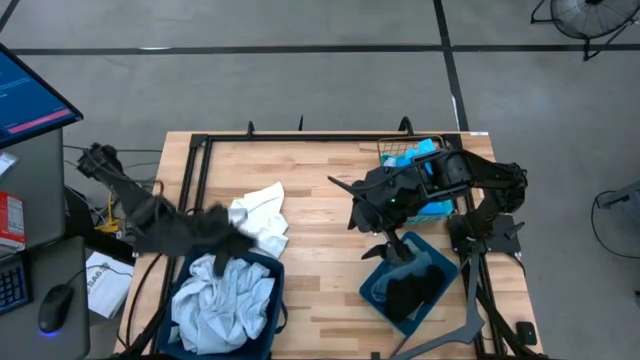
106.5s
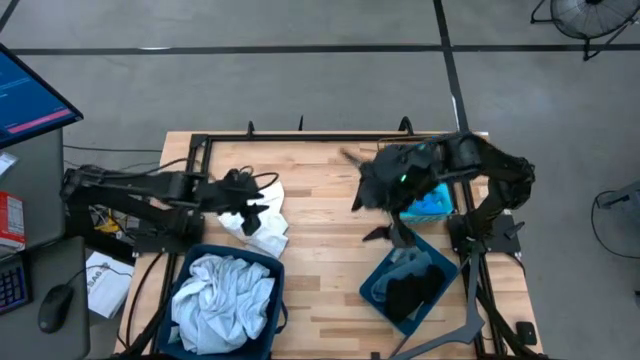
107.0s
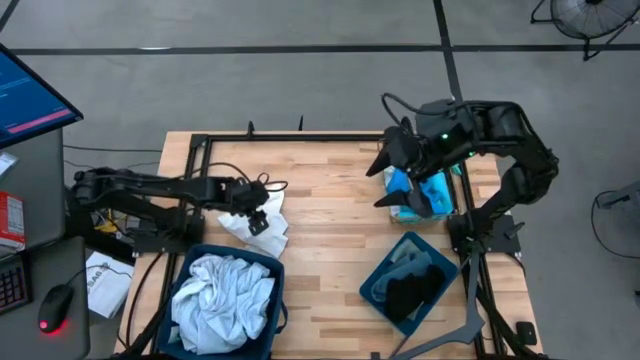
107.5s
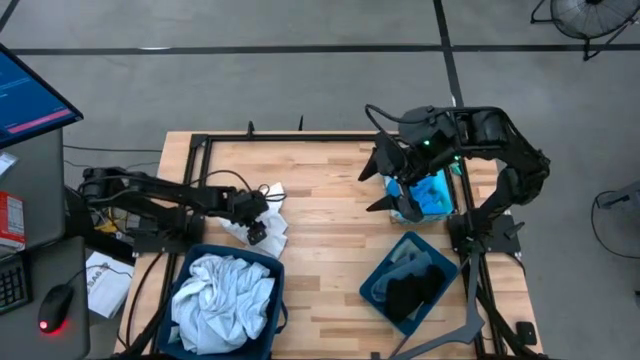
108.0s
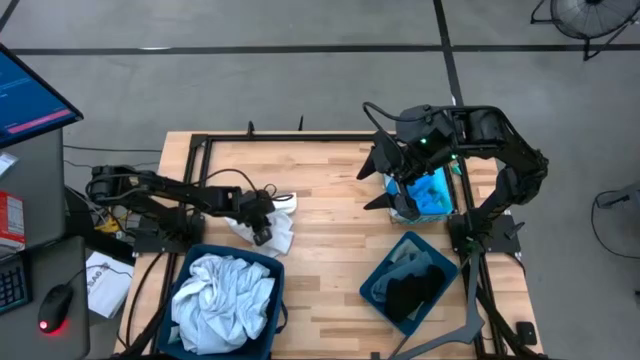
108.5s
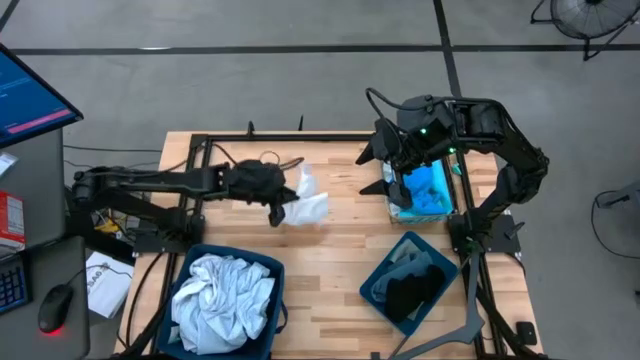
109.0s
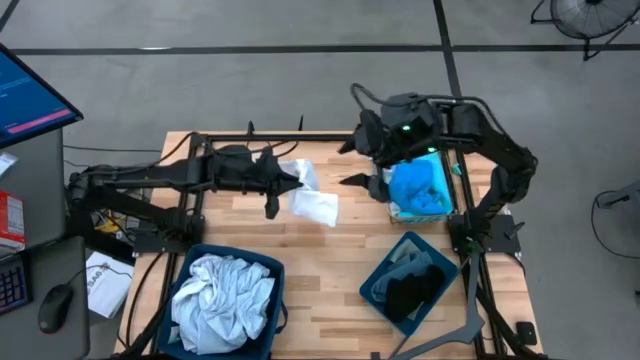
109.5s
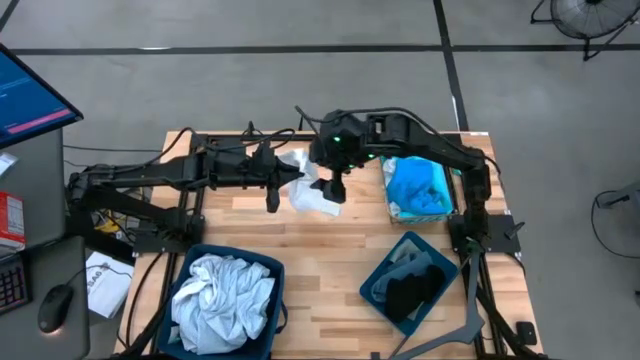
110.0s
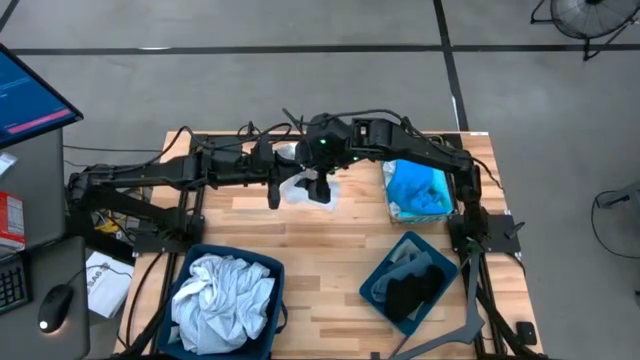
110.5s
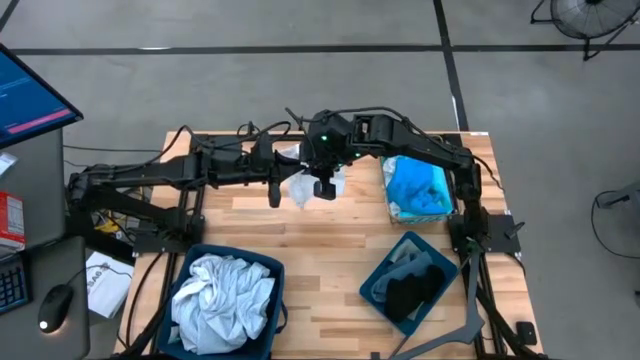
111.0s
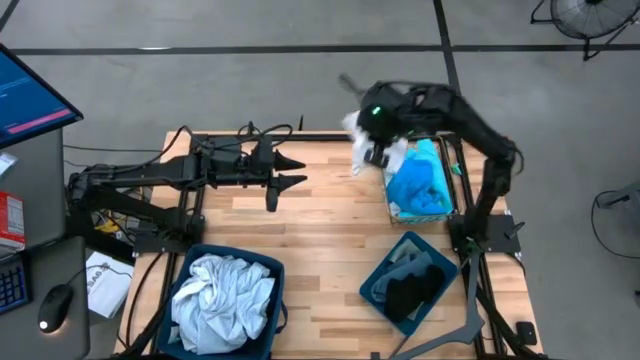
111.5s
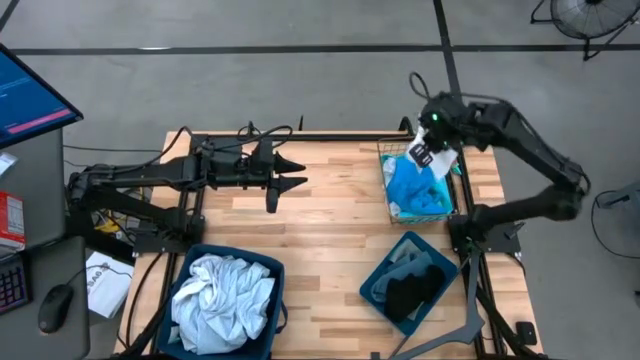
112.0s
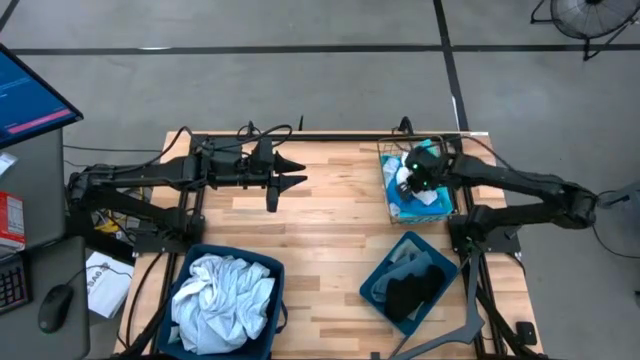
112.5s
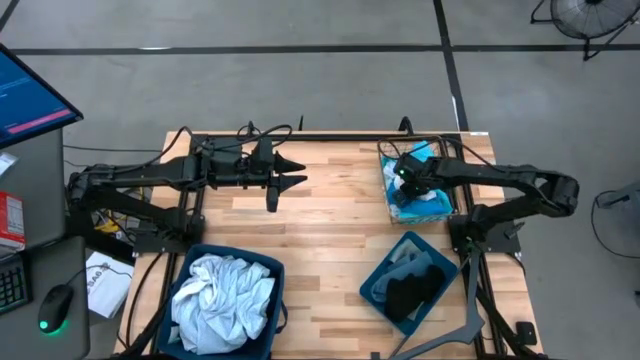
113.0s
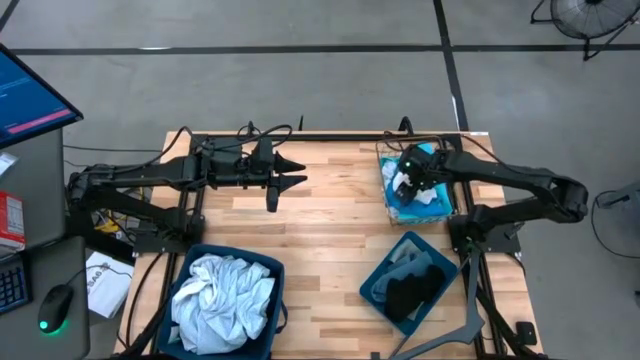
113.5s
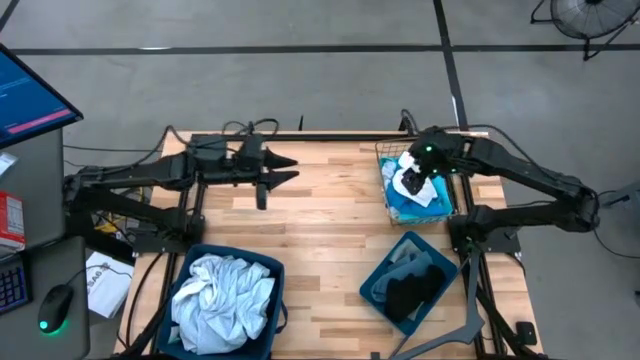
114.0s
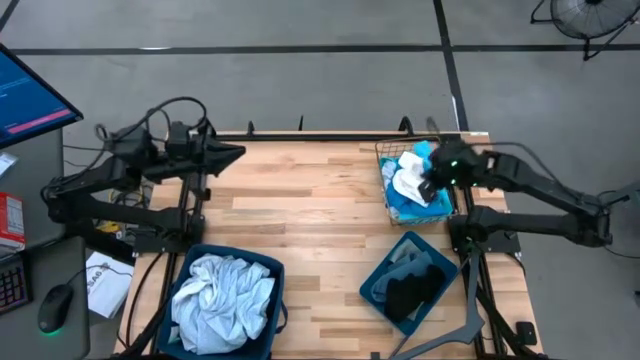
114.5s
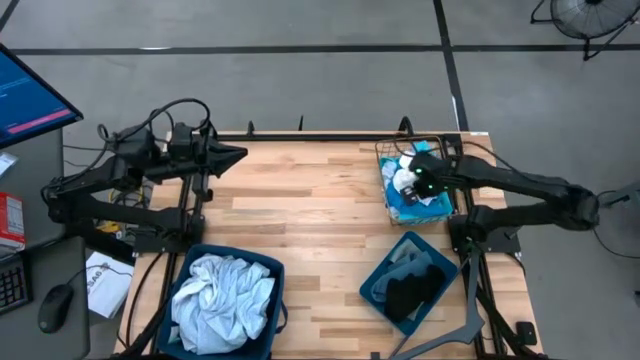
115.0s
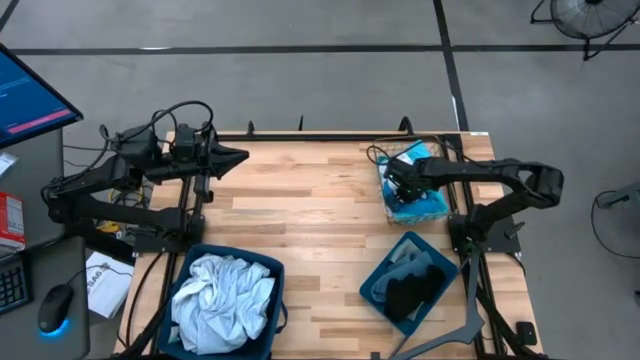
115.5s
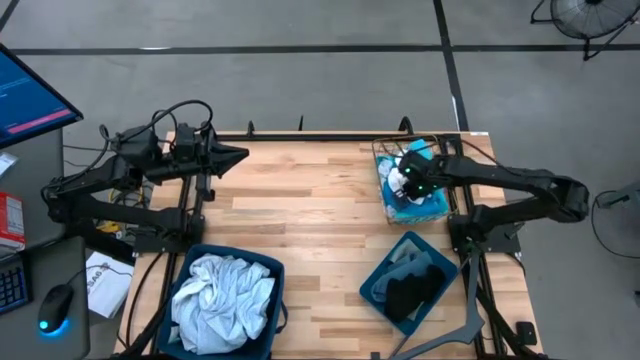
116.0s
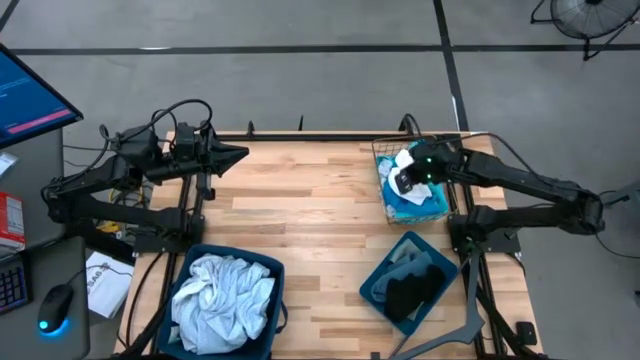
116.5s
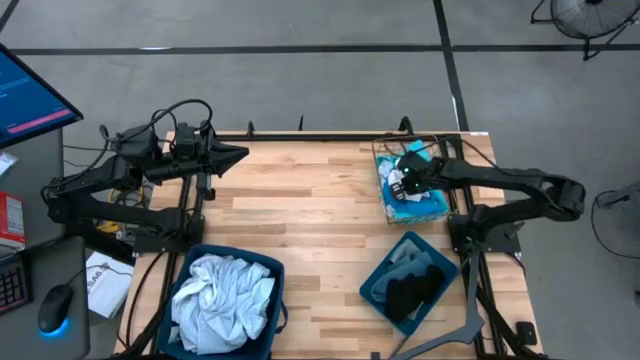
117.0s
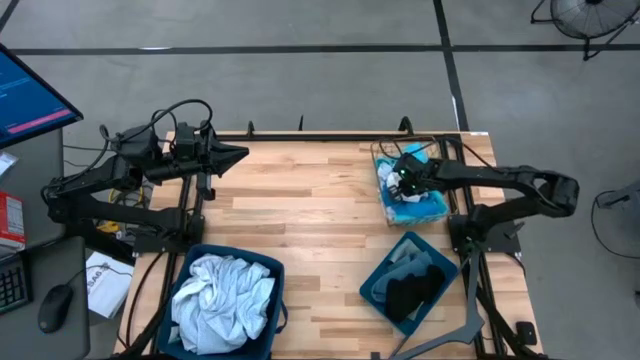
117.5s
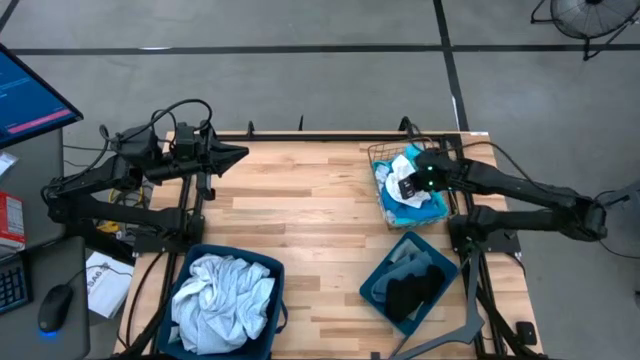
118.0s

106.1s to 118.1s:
Task: Pick & Place Cloths
Put the white shorts into the wire basket

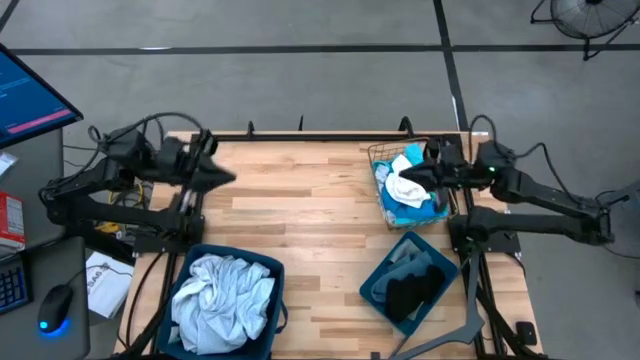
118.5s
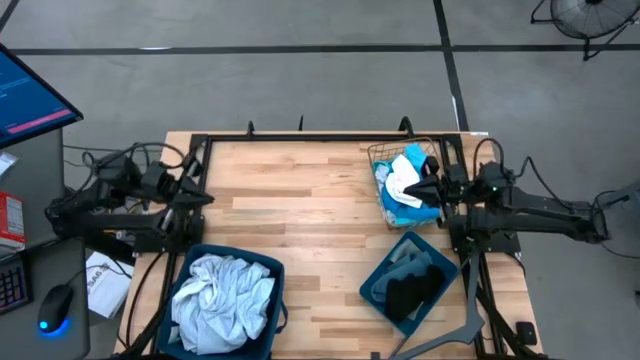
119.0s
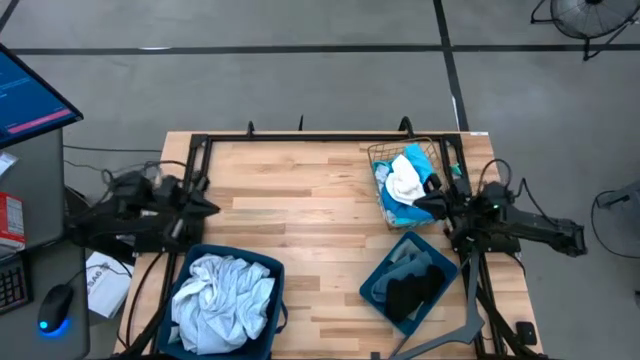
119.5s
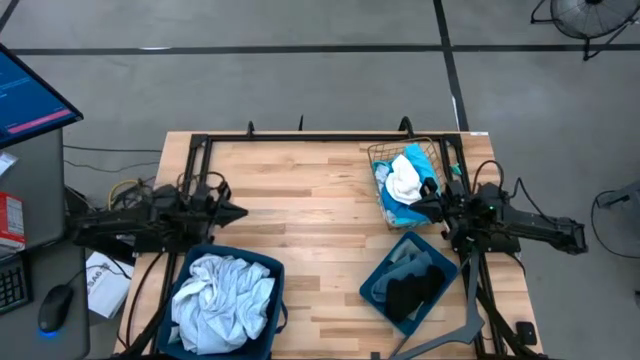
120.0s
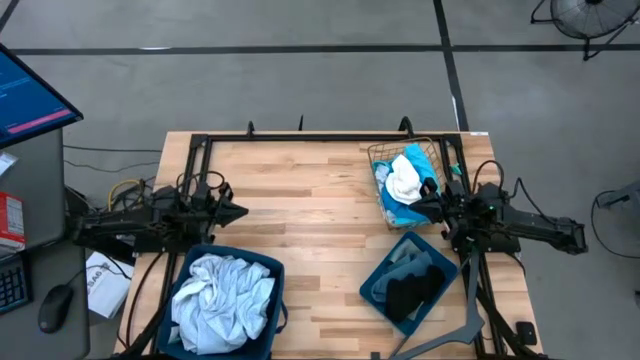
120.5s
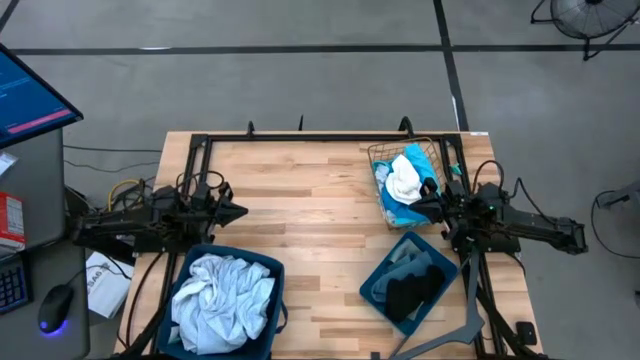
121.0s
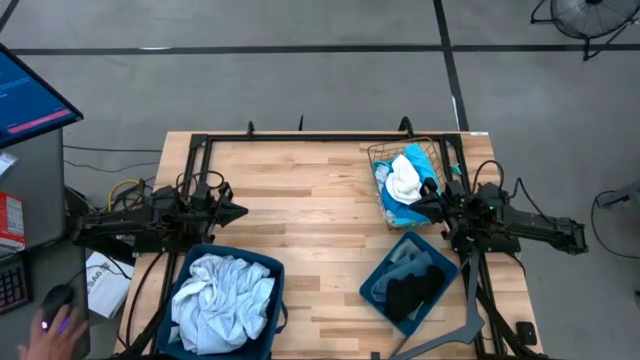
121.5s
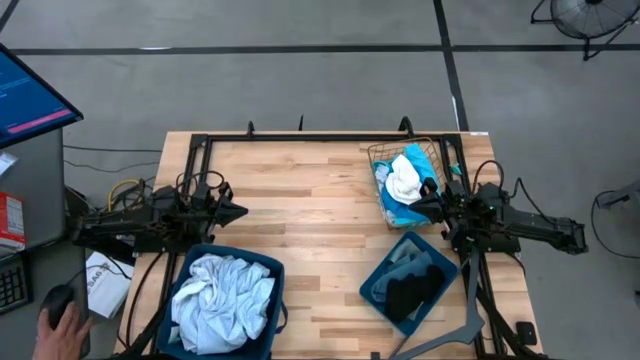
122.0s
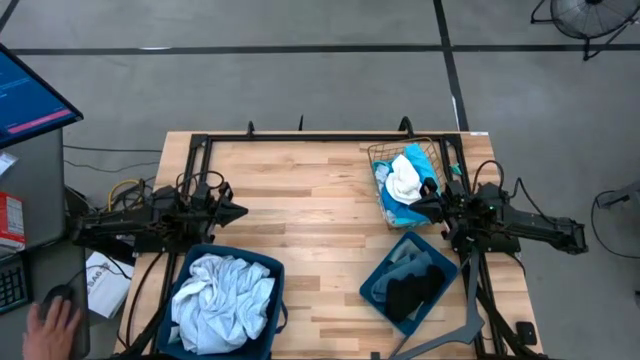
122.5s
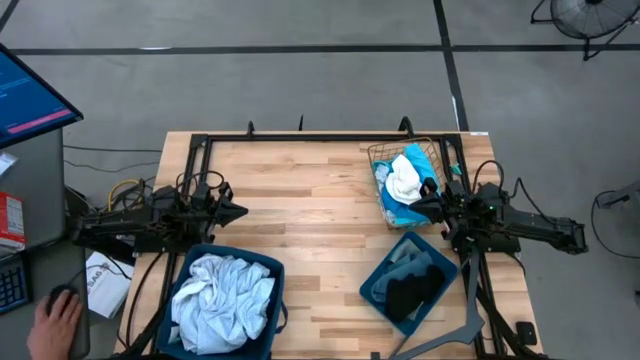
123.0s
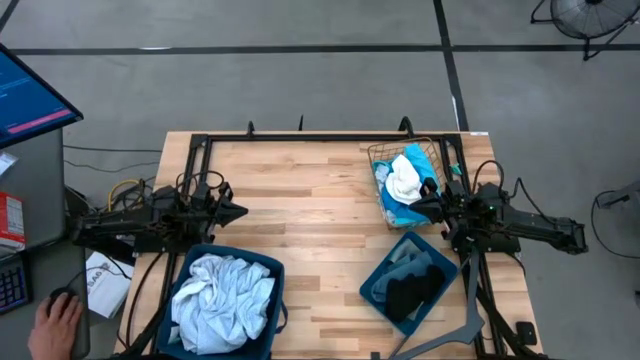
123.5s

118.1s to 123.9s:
Return to Home Position

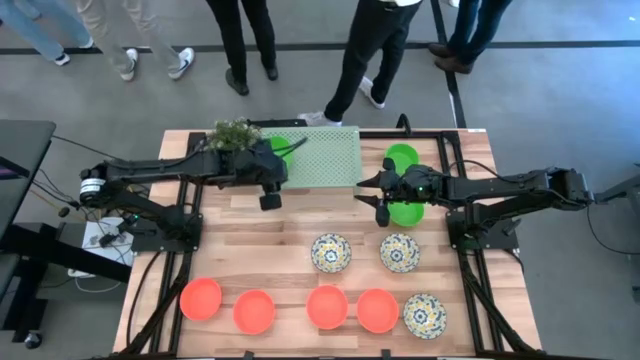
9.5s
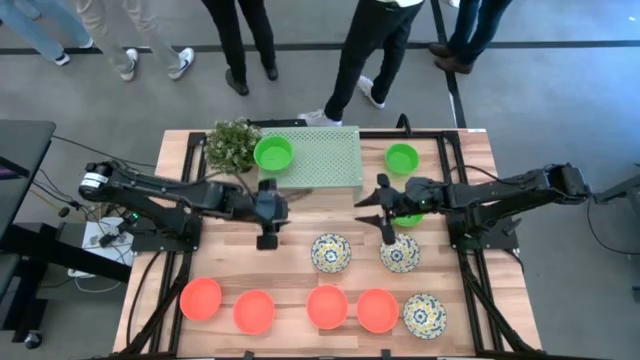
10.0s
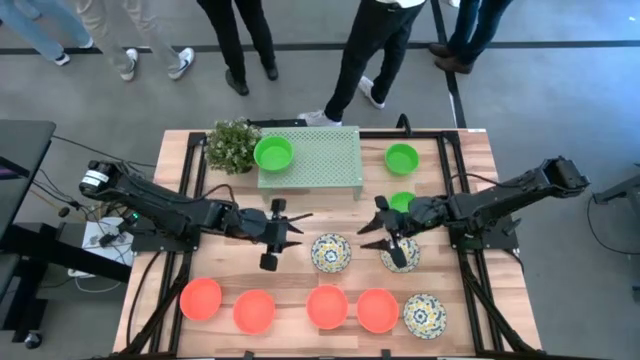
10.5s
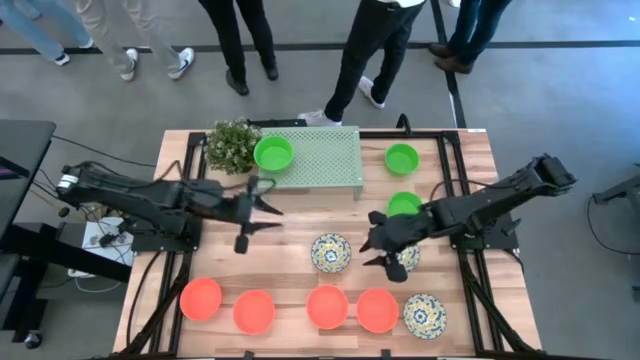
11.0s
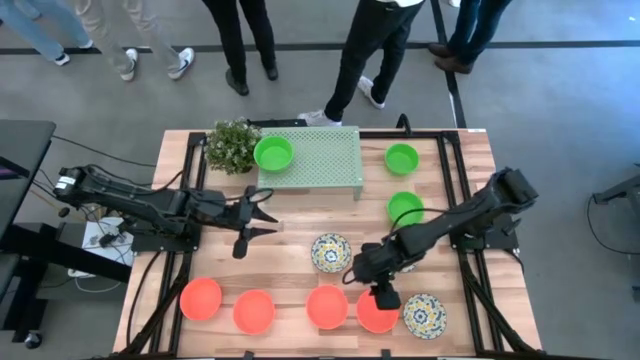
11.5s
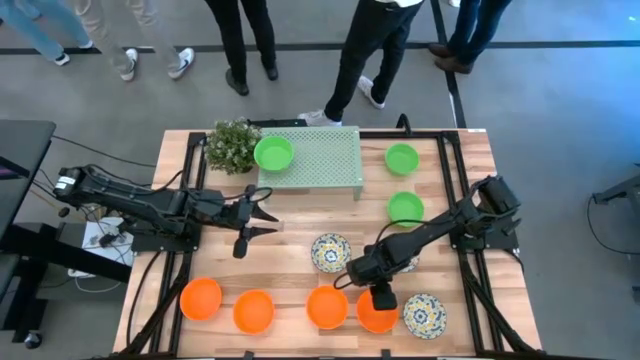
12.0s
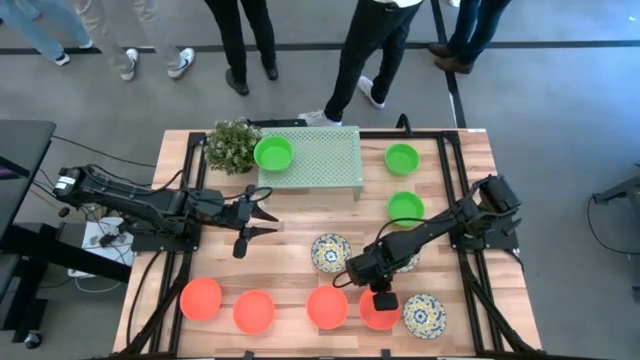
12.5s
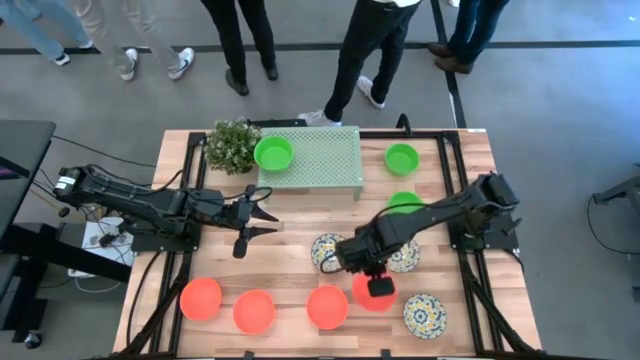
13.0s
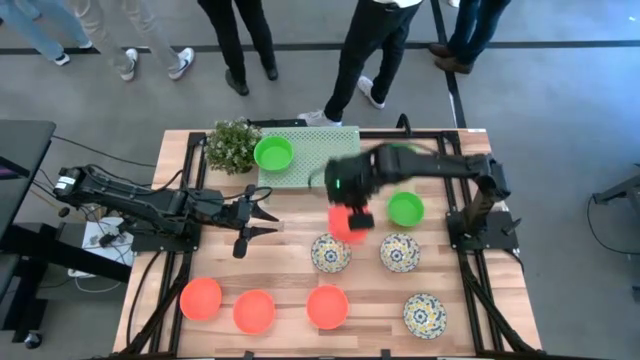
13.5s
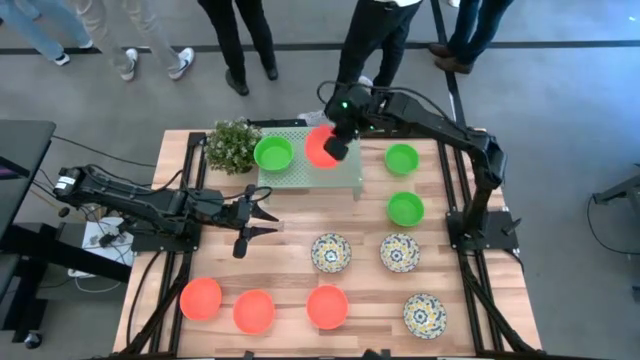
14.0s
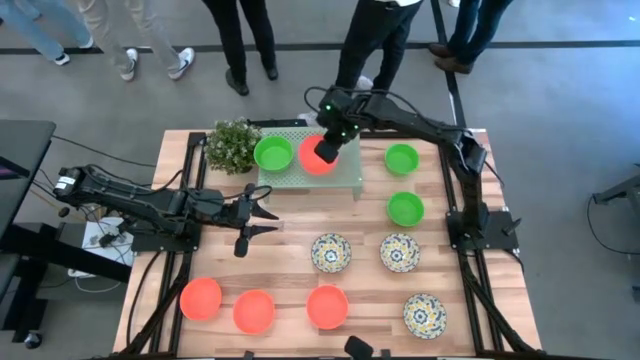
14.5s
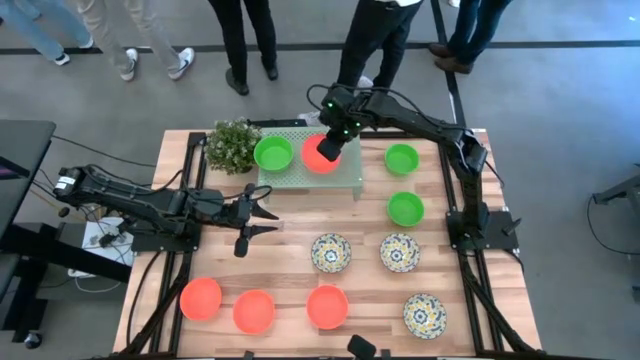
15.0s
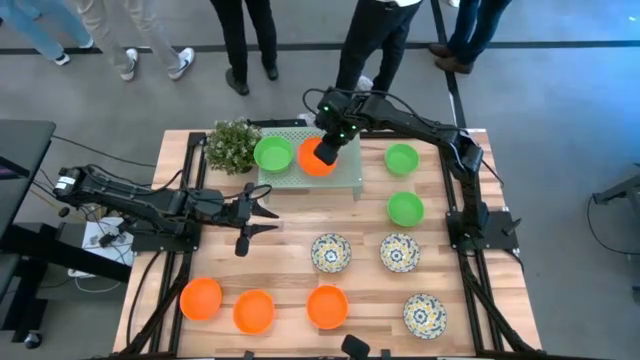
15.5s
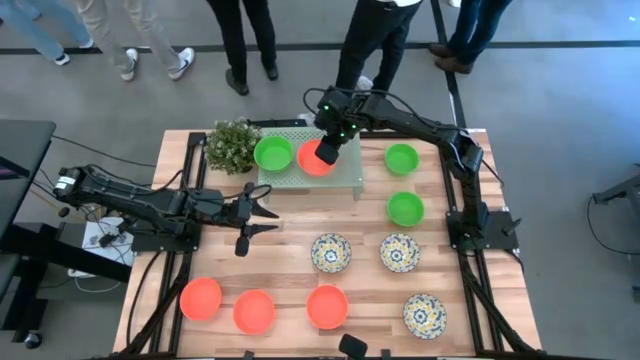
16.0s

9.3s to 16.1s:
Task: Pick & Place Mini bowls
Put the orange bowl on the shelf
